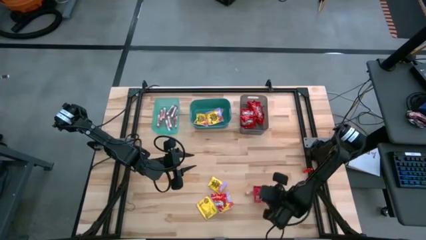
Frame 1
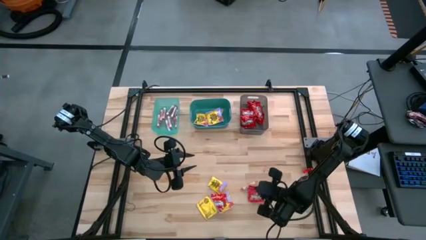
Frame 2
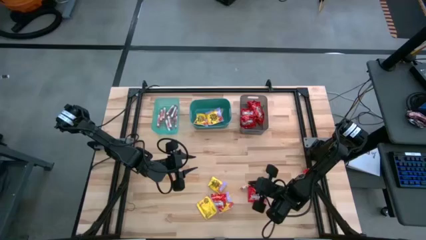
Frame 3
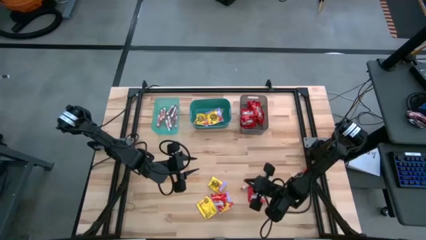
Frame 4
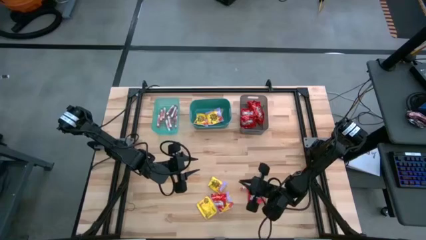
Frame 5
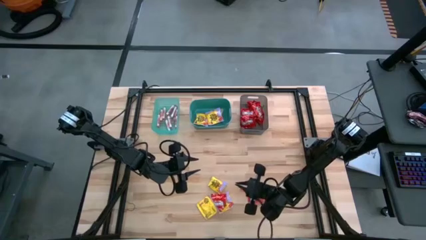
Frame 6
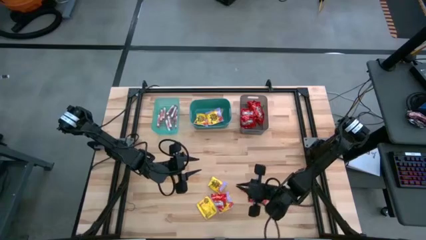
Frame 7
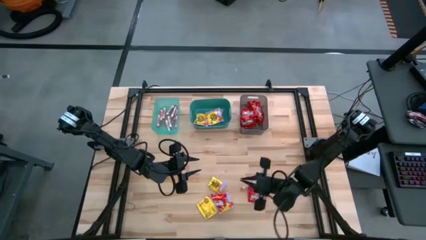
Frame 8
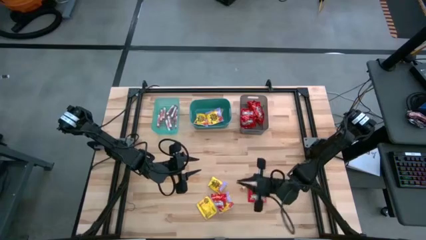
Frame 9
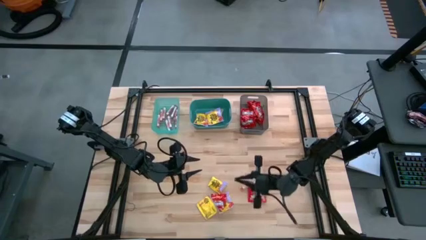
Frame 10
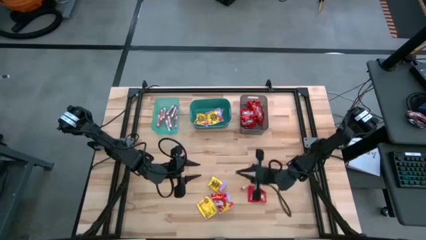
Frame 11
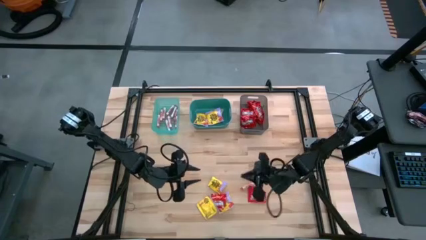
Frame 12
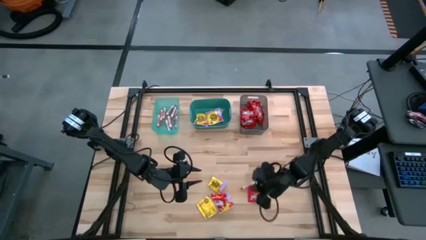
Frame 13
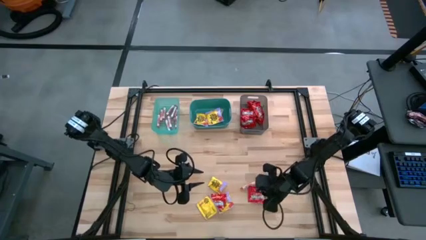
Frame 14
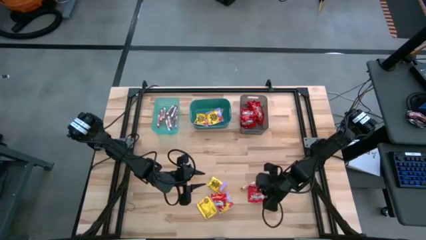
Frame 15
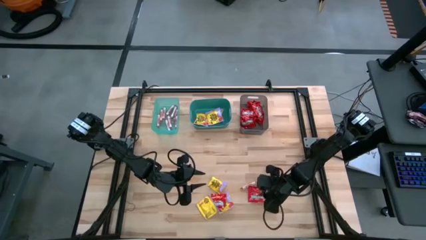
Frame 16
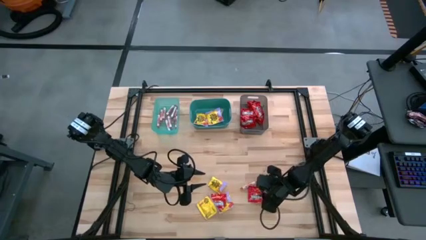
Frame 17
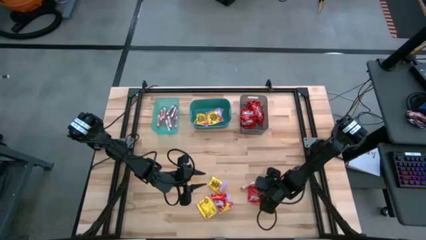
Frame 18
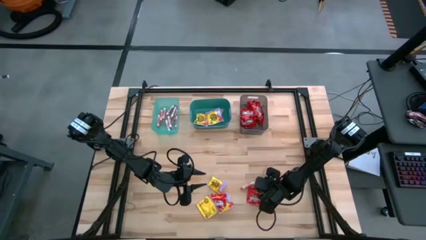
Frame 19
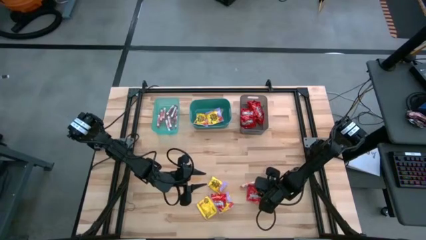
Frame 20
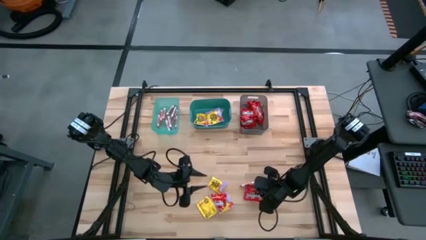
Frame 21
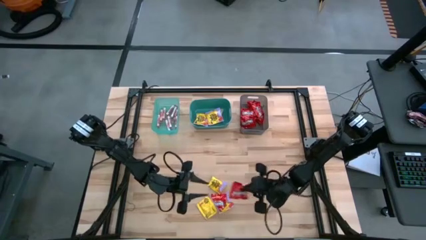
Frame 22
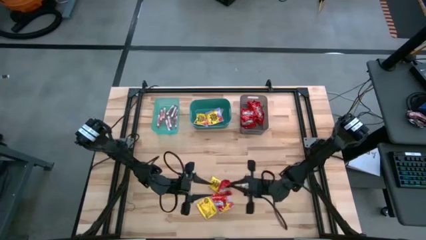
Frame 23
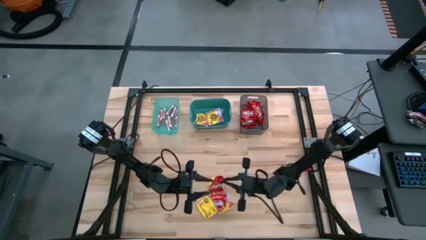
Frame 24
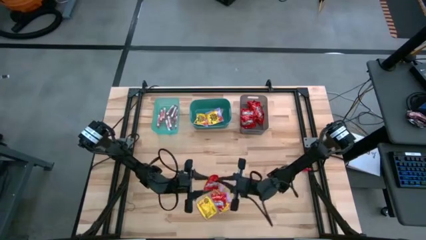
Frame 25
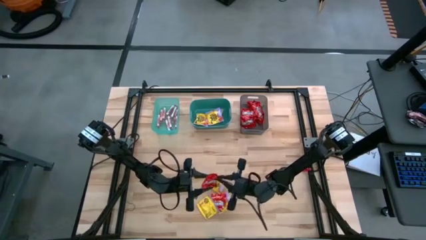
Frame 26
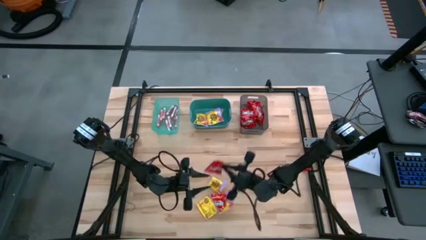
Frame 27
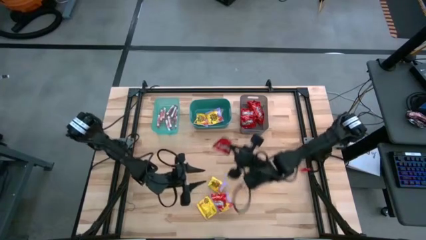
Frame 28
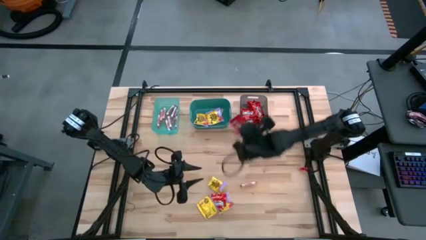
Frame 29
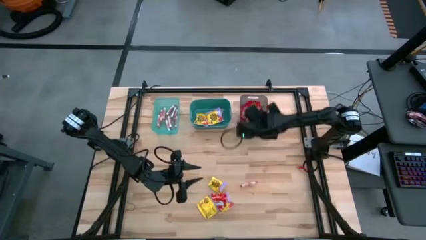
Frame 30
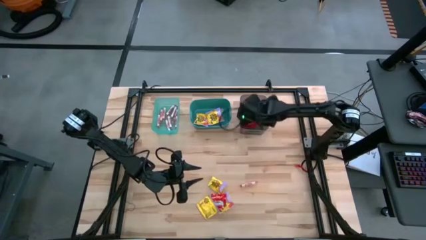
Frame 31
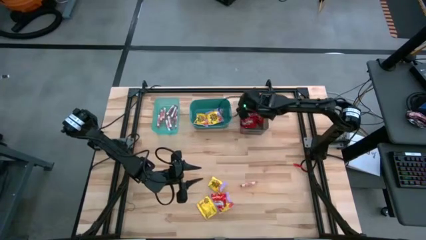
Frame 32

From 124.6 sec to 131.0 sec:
Task: Sort candy
Put the red candy into the black bin

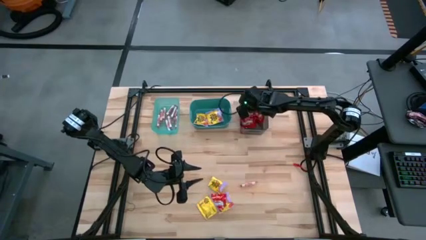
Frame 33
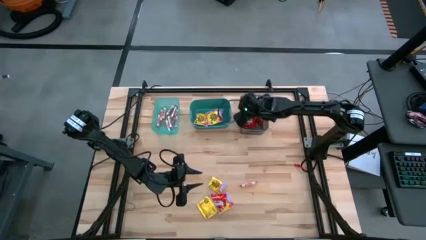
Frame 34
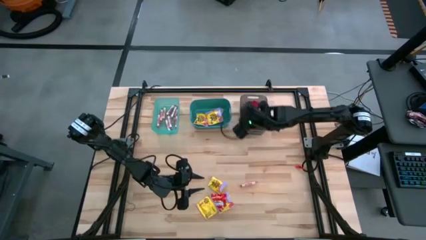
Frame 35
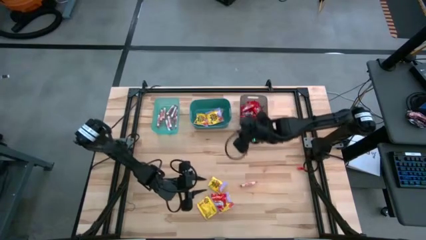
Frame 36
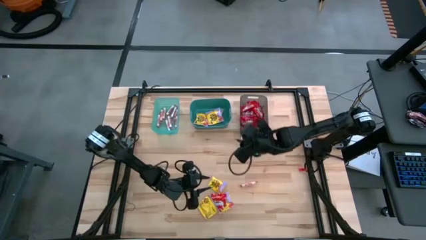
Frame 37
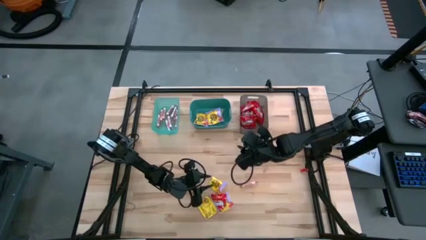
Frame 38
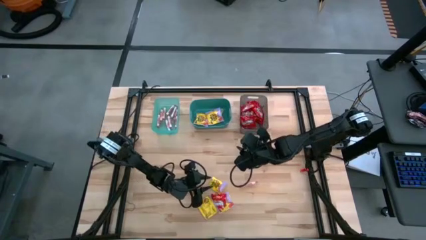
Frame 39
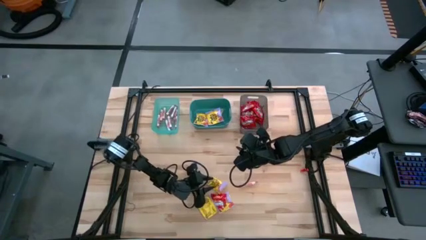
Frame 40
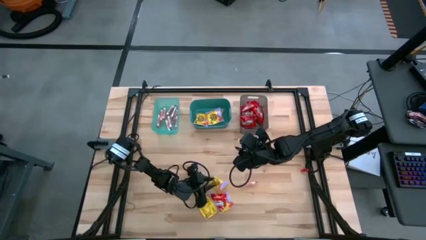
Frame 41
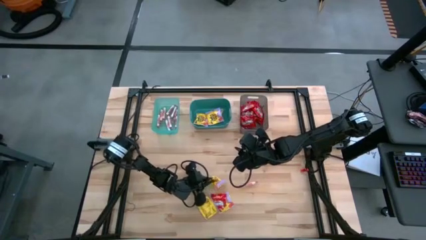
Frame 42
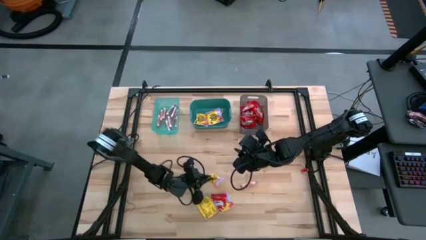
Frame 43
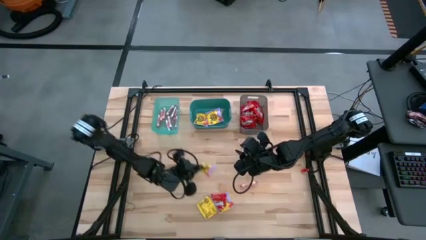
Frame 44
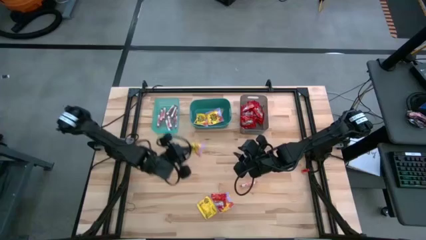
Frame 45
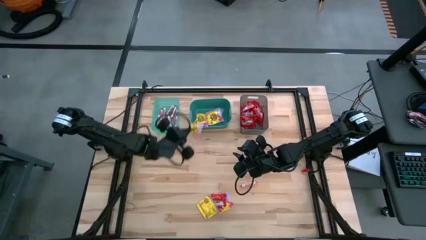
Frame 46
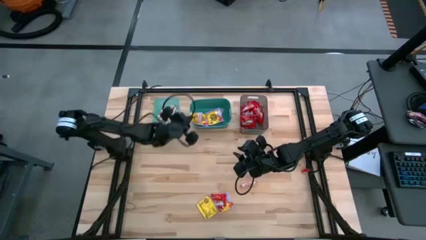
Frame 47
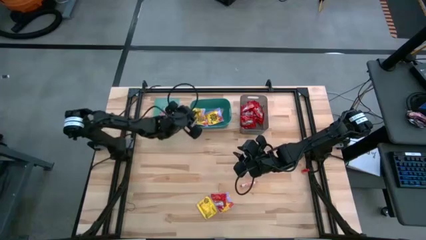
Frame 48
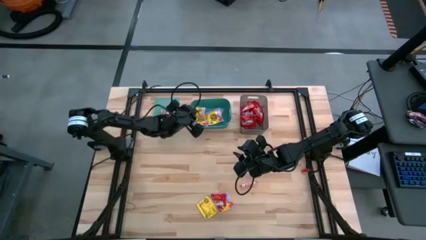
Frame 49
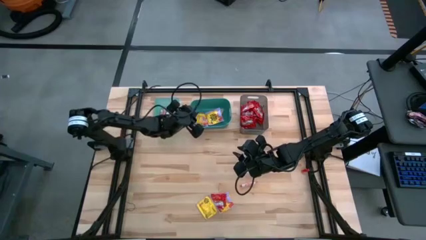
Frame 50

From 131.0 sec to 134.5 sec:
Put the yellow candy into the green bin

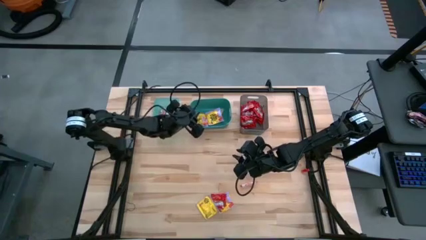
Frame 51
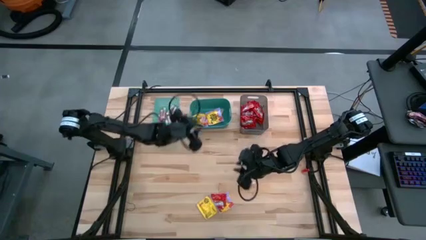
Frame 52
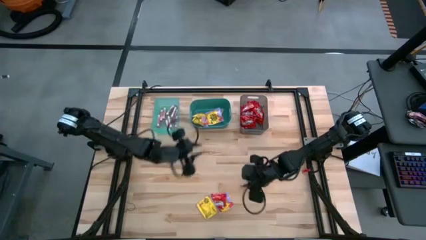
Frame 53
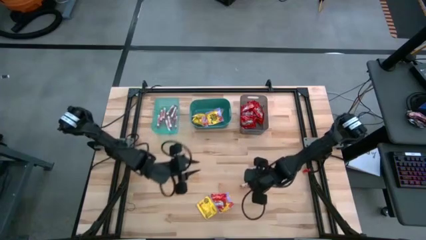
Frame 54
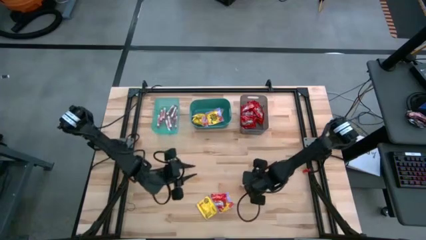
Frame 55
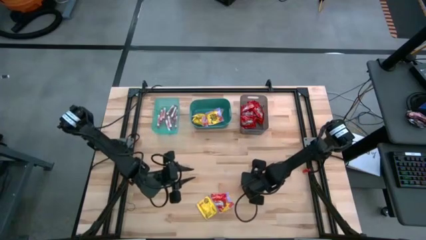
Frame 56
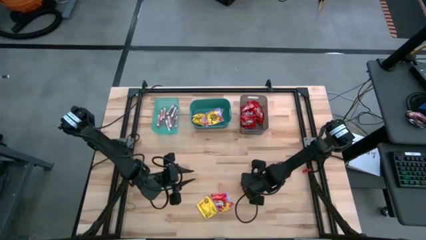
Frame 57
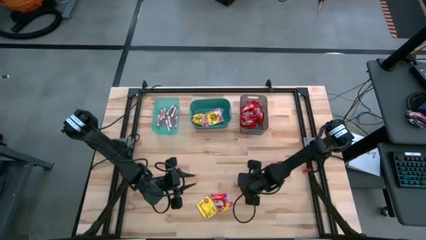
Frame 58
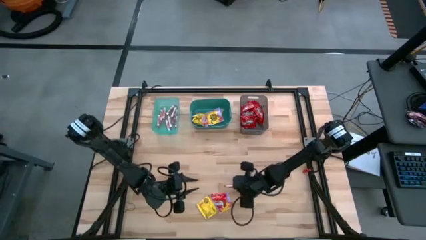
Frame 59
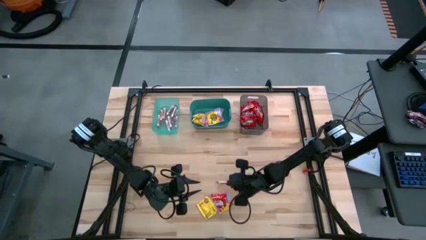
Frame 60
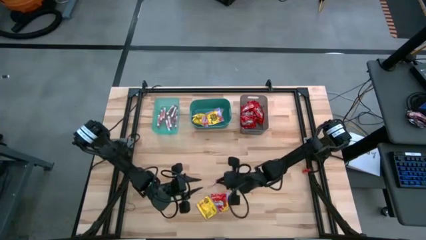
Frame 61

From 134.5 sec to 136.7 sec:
Put the white candy into the blue bin

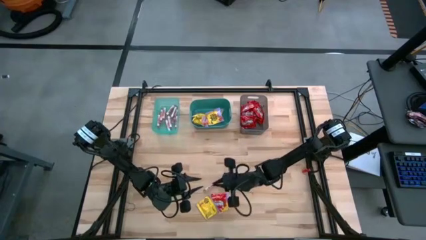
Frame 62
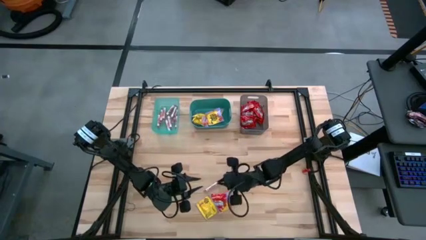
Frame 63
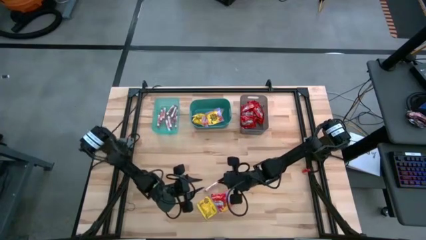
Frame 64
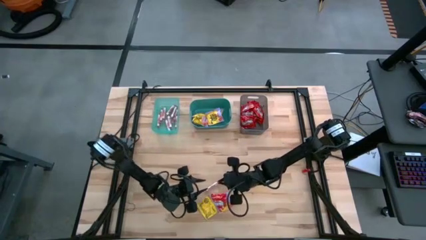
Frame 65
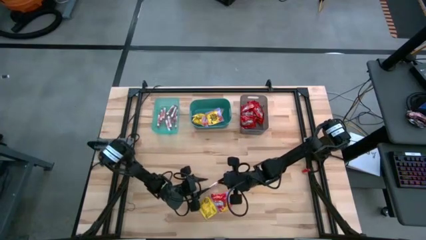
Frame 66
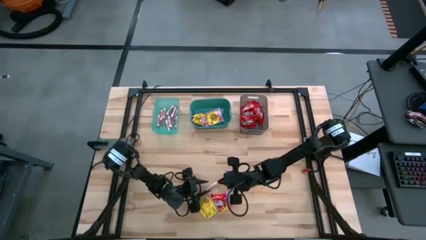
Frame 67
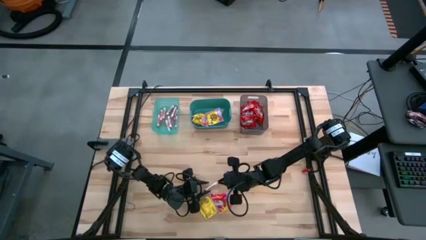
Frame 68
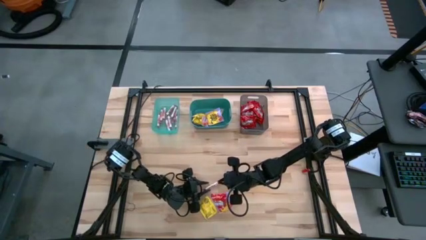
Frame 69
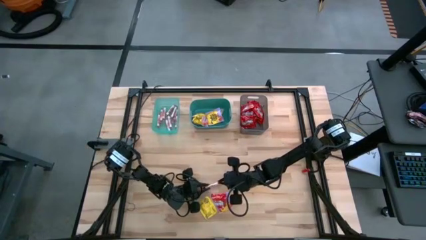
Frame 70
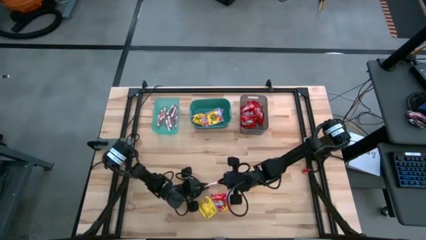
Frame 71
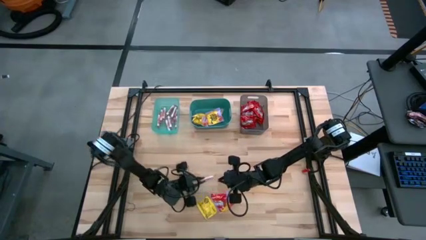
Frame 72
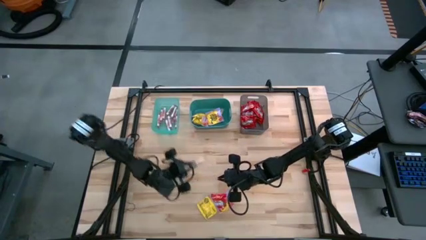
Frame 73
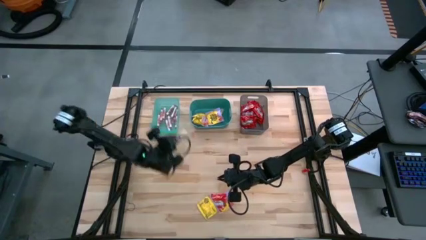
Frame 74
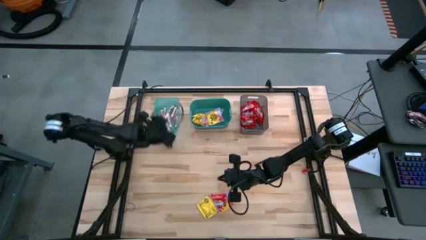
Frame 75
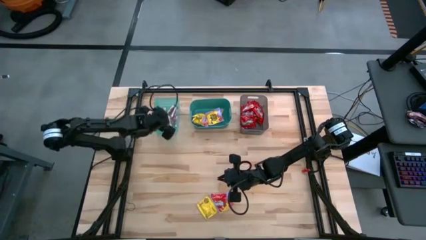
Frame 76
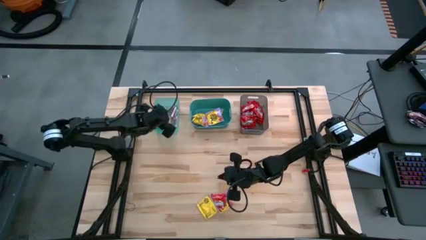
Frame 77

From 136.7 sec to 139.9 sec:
Put the white candy into the blue bin
